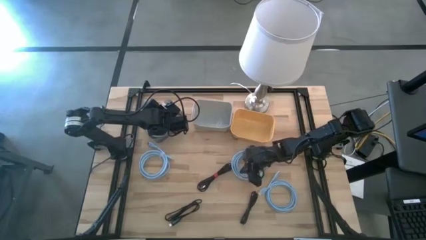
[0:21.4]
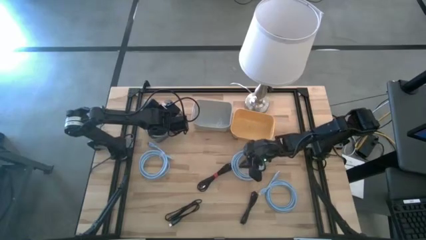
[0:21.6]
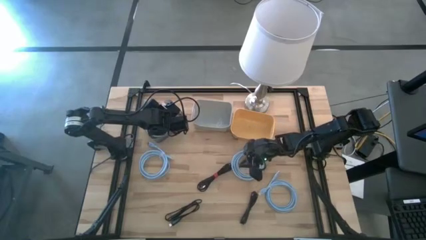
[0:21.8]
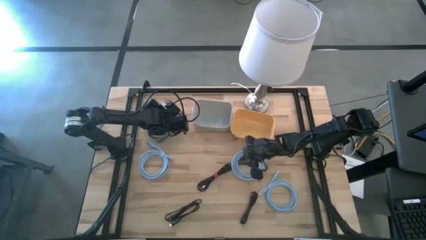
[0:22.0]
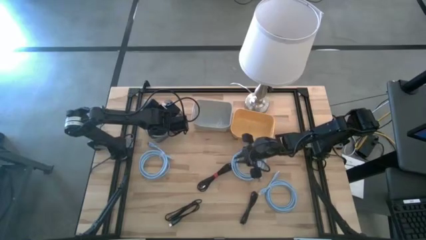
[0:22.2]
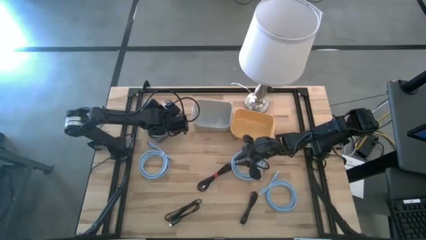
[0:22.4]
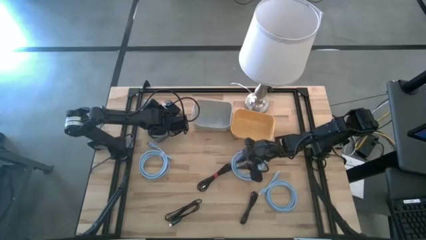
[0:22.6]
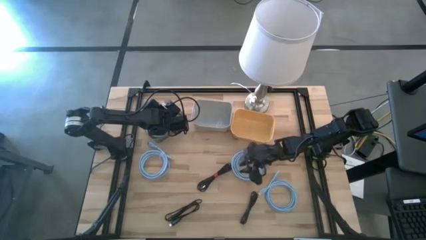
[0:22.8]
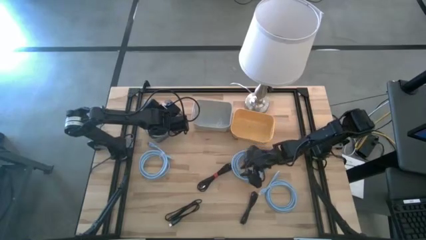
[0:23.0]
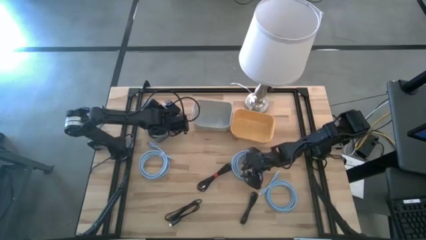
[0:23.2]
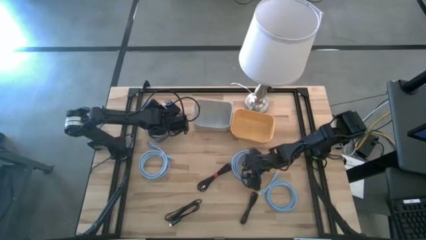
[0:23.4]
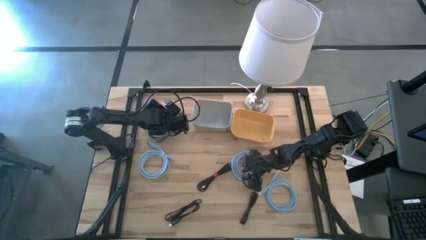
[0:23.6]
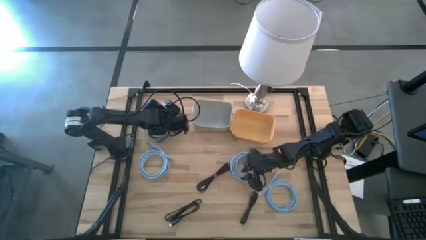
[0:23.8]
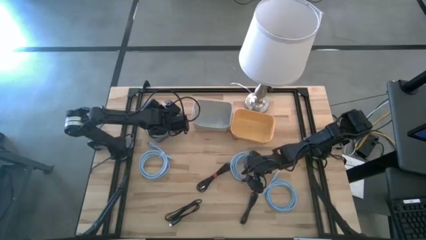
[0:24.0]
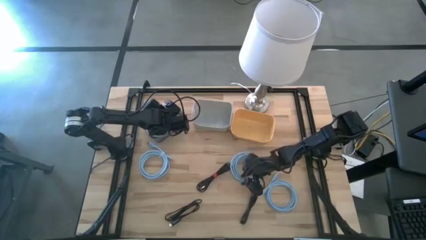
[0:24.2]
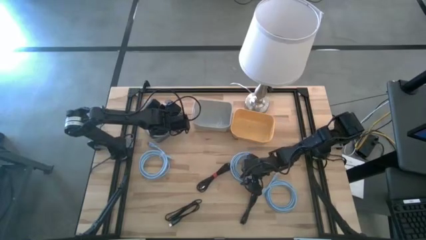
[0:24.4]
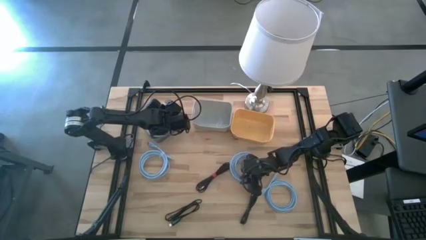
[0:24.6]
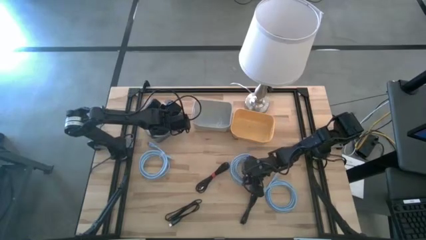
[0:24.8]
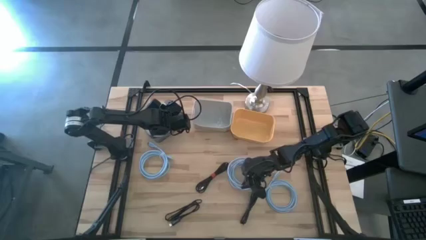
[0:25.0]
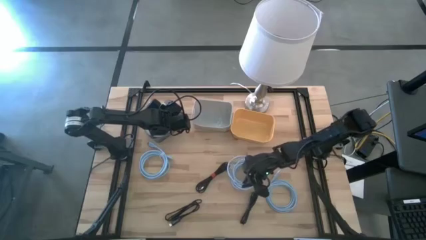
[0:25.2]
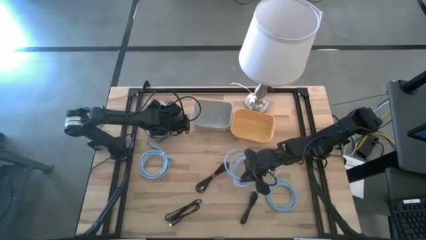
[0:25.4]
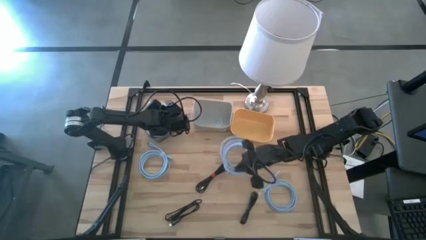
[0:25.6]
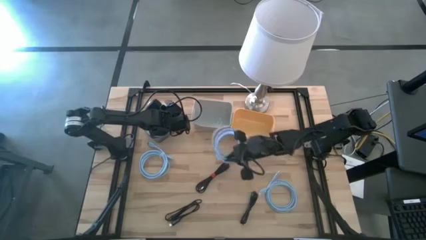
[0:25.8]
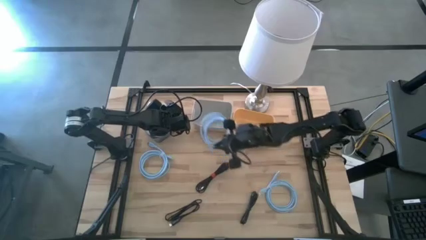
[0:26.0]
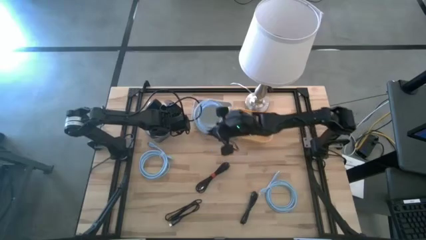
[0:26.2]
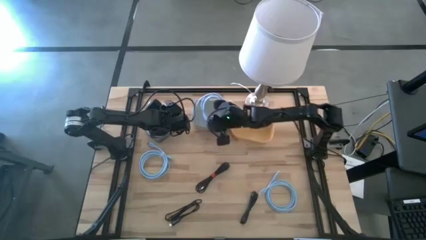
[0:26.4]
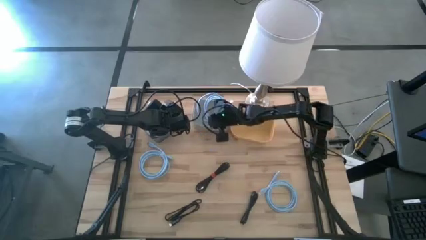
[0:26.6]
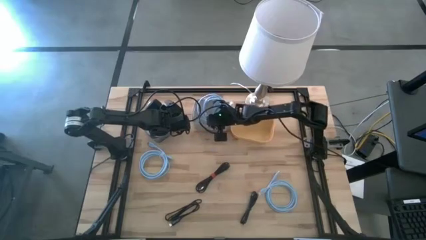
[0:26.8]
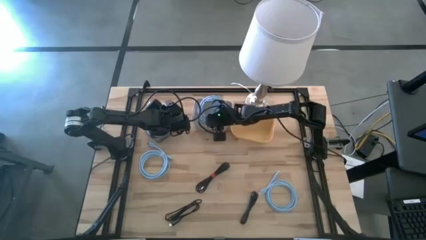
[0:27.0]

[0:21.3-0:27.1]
Task: Pick & Place USB Port
Put the top right blue HDMI cable into the gray bin

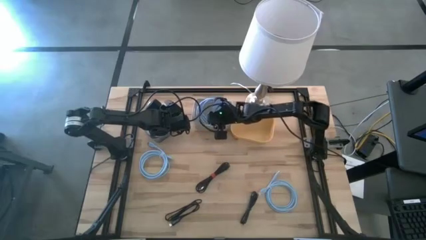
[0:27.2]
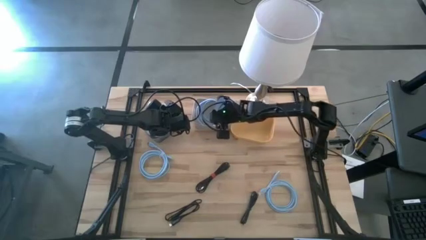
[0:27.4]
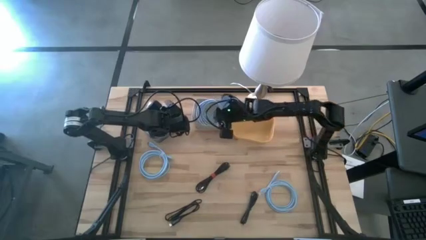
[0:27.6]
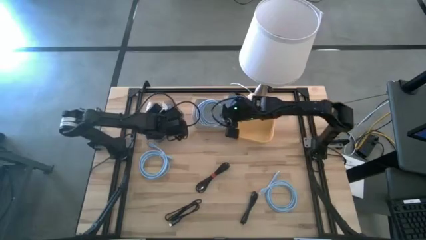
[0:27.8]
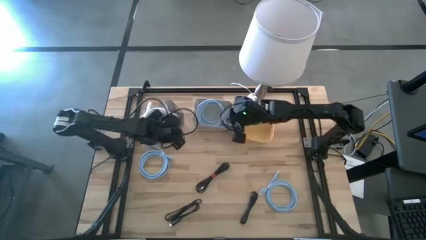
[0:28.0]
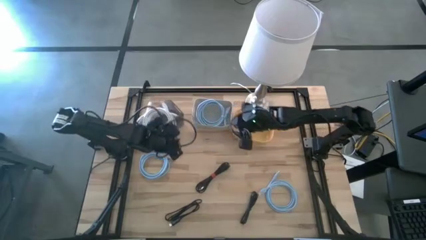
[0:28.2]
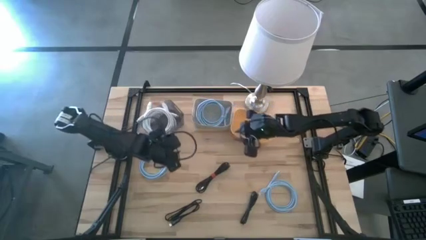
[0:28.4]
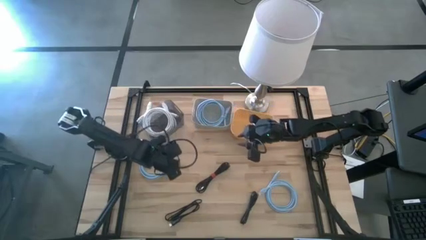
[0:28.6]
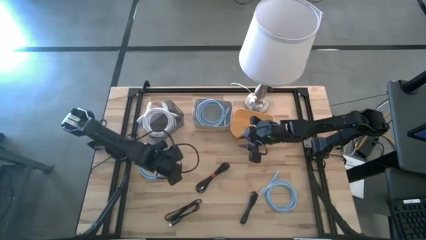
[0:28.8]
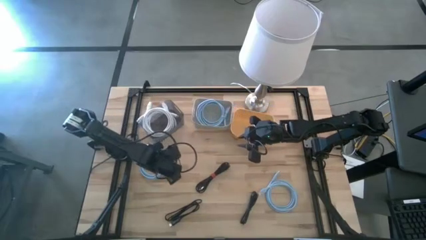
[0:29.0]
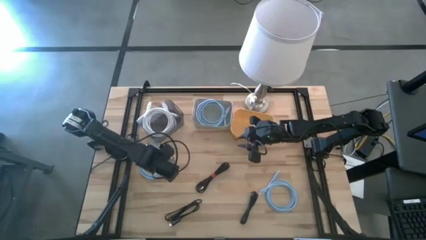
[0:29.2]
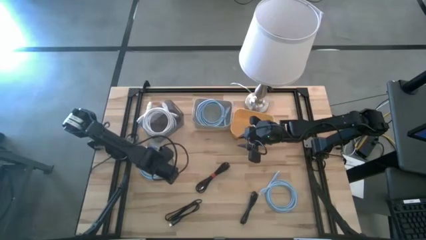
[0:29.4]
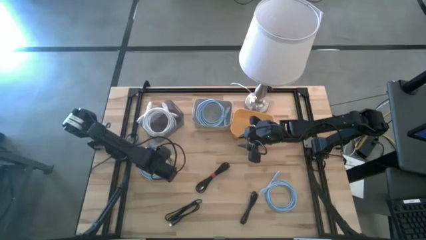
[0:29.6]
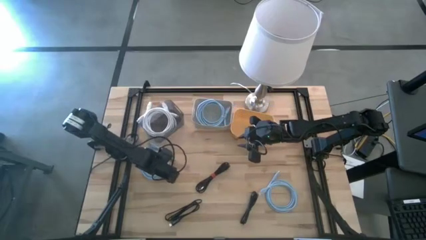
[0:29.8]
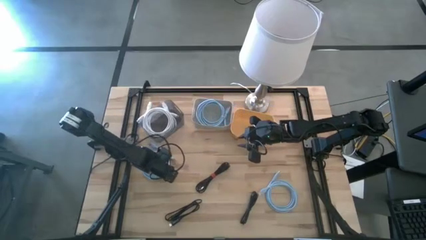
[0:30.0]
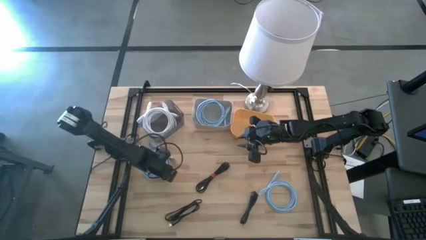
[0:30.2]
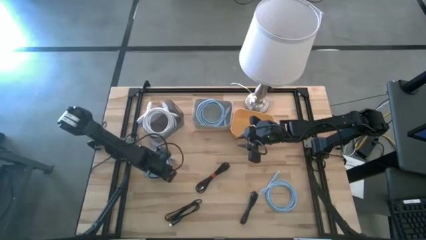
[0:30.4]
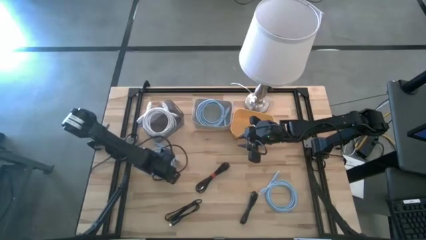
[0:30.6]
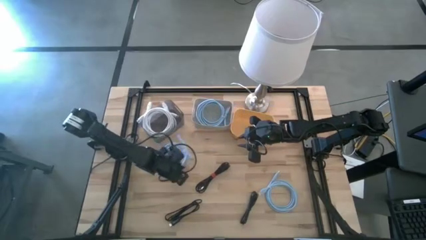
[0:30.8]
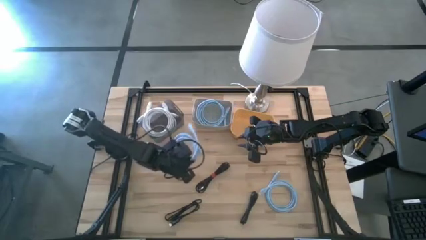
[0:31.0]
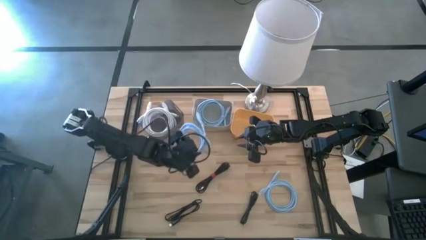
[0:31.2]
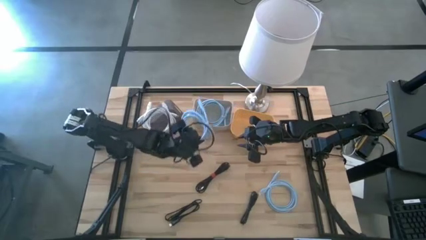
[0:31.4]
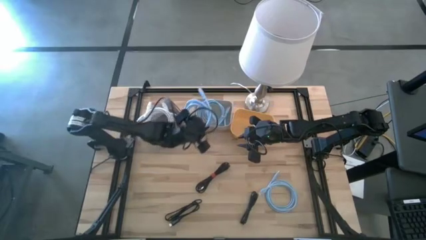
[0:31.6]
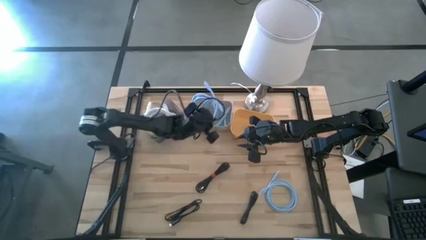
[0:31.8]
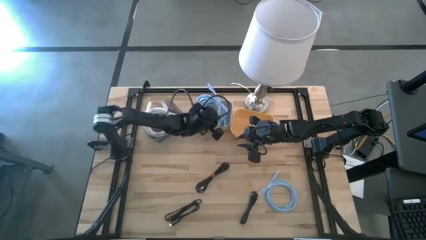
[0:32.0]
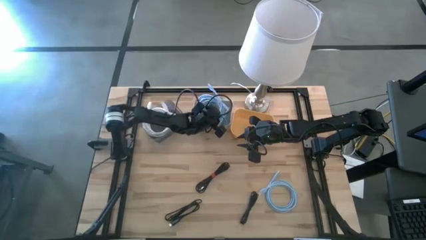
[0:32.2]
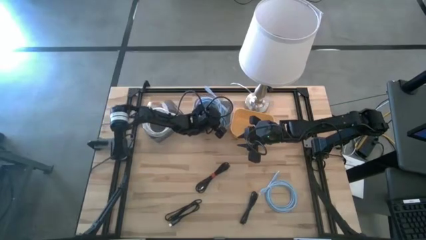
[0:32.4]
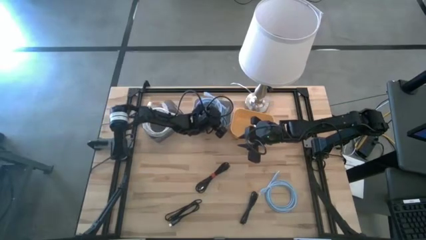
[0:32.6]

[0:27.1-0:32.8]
Put the top blue HDMI cable into the gray bin

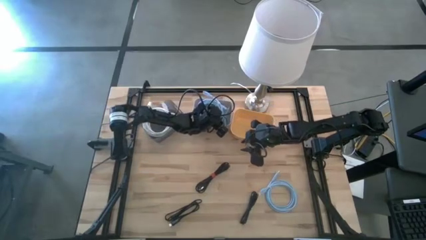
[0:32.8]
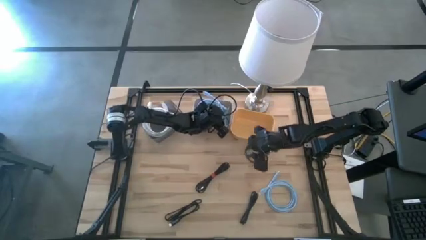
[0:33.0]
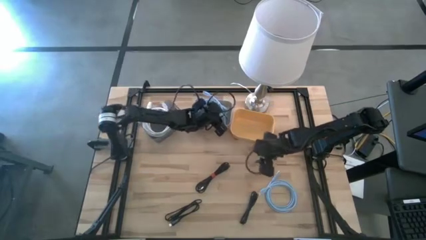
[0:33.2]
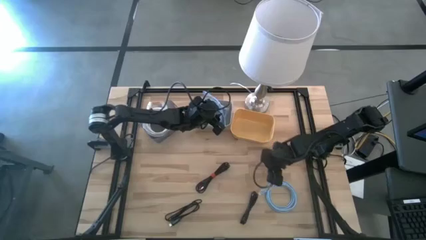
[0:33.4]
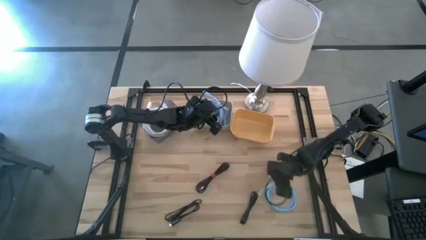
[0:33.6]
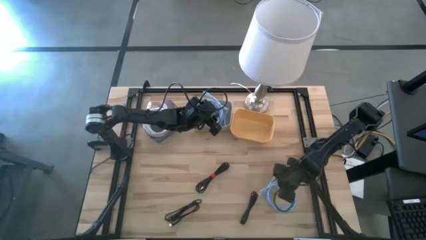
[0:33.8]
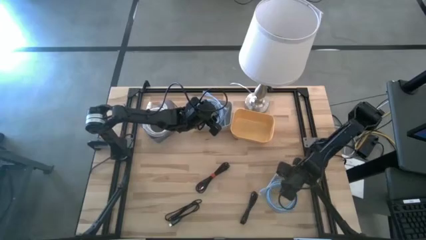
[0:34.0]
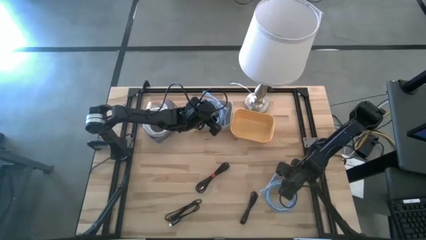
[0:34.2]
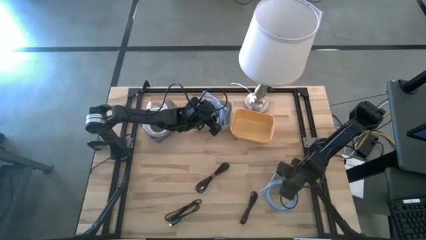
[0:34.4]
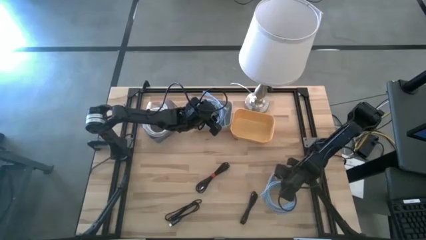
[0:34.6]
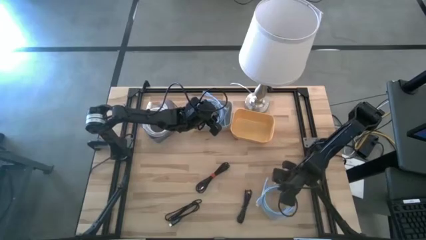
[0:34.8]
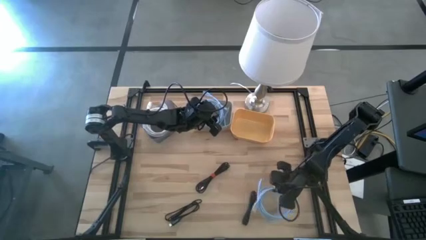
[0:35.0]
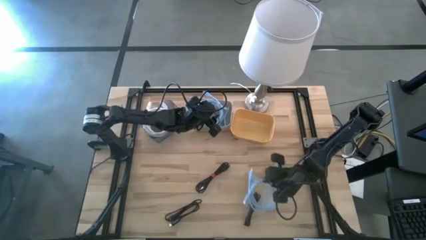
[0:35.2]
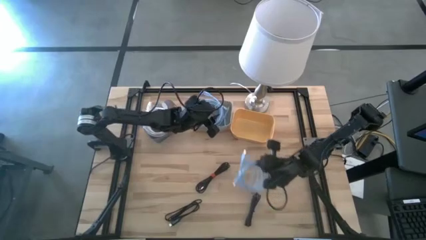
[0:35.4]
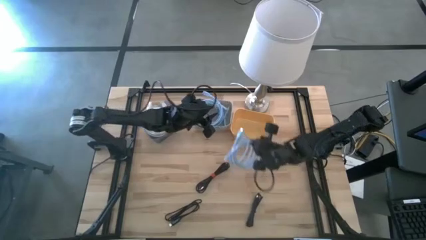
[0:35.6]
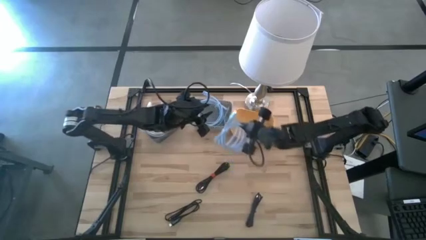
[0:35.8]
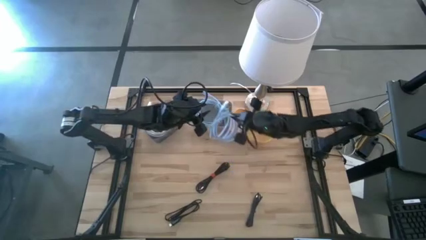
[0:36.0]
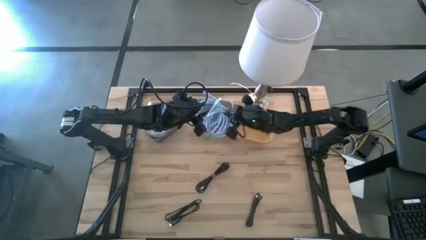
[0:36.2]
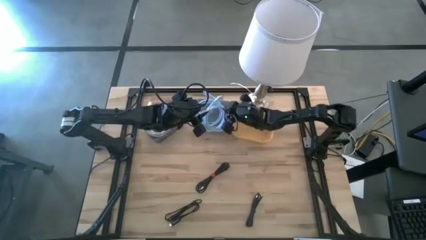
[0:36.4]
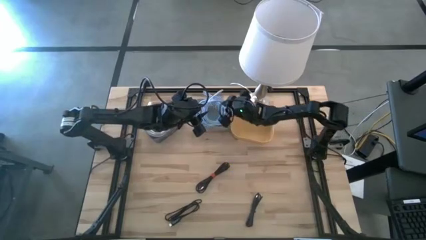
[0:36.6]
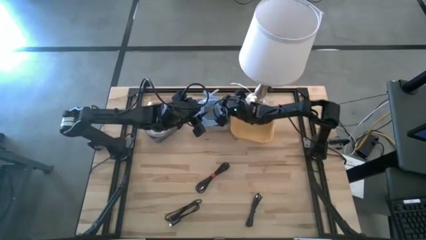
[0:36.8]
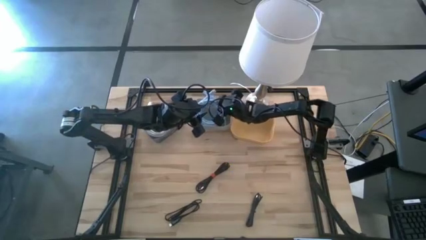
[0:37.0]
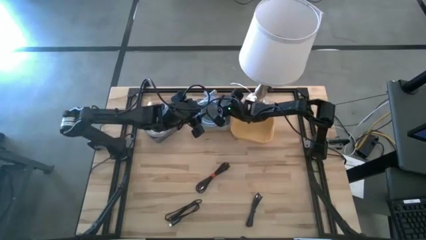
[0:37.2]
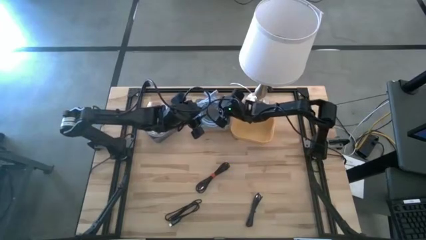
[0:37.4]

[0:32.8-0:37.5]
Put the blue HDMI cable into the gray bin
